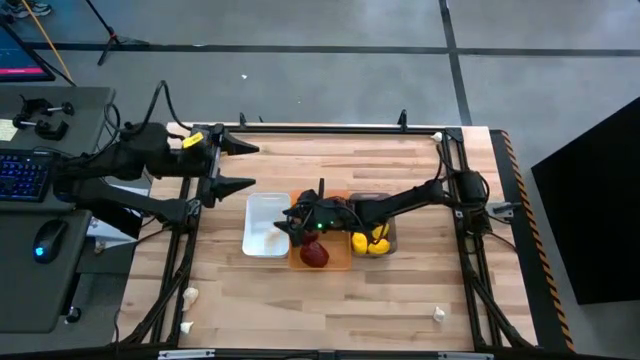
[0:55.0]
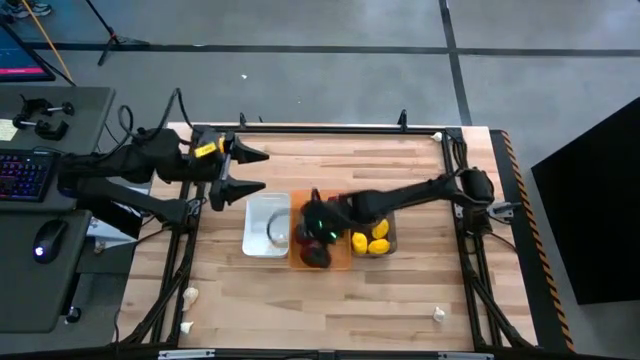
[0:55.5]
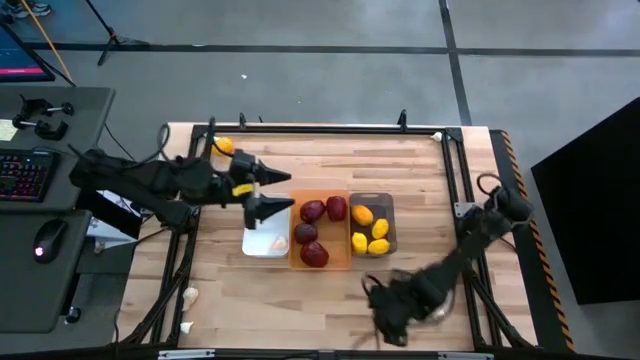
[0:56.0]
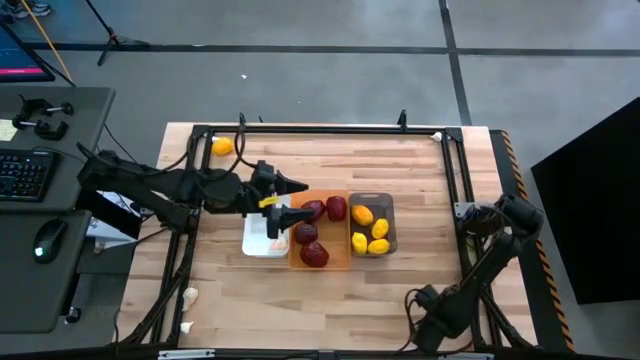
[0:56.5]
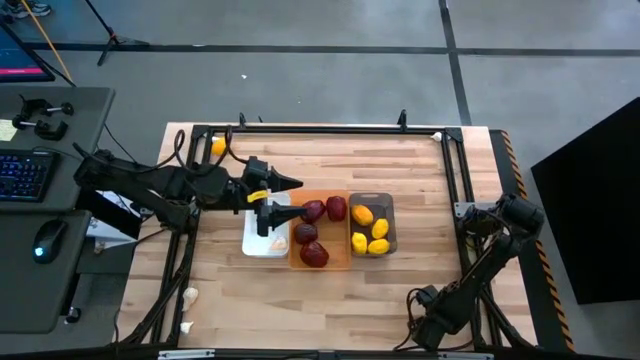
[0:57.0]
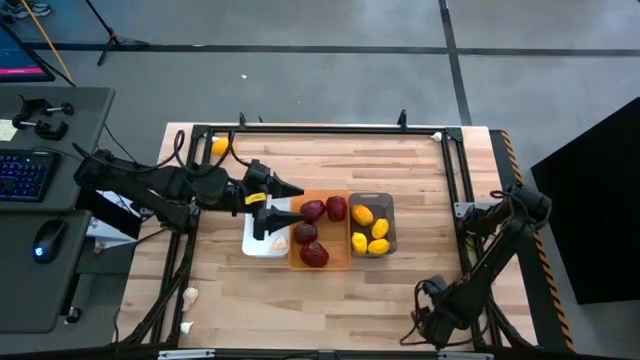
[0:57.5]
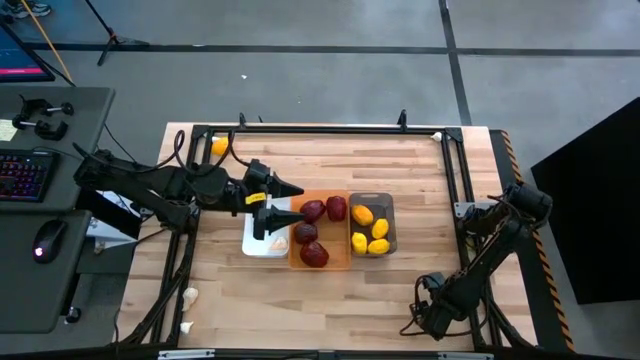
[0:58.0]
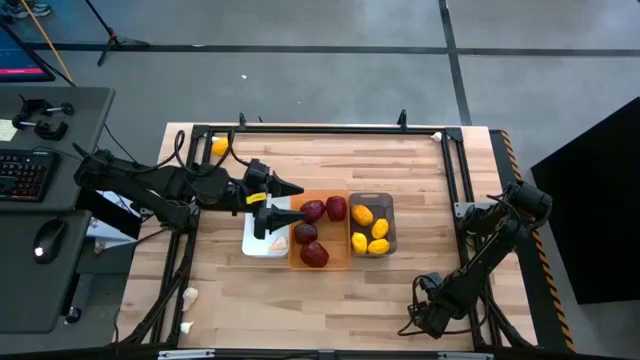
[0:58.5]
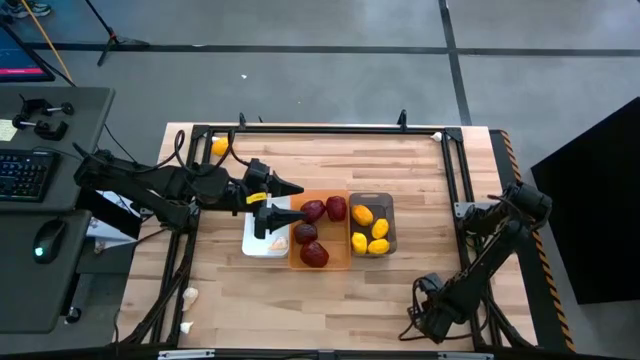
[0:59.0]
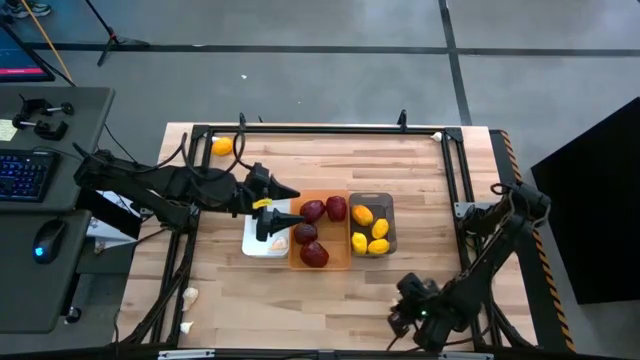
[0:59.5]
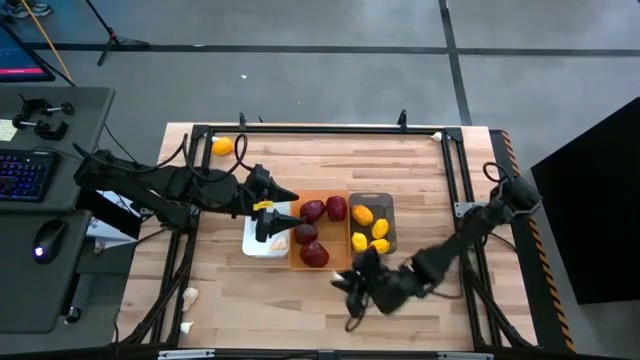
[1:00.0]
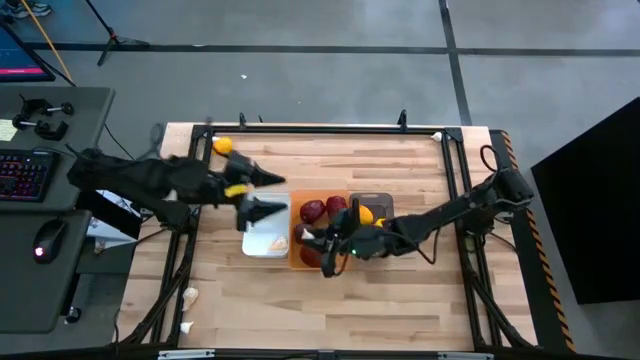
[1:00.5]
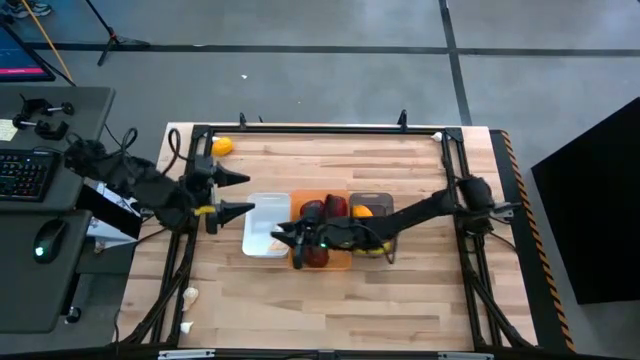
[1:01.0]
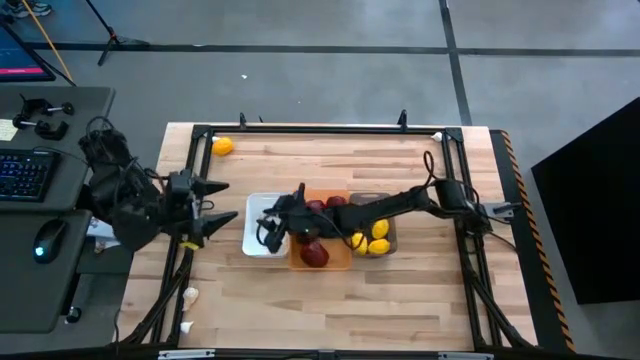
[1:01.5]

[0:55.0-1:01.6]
Task: Sort produce into baskets
Put the white garlic into the white bin

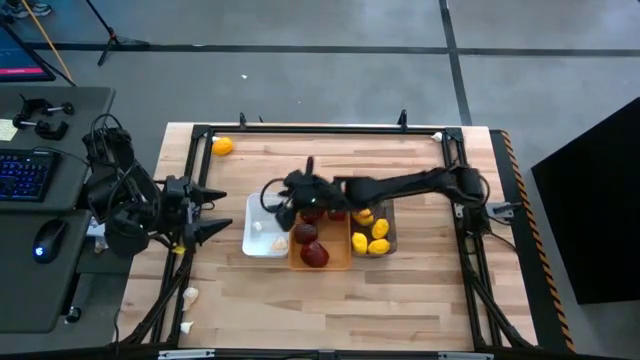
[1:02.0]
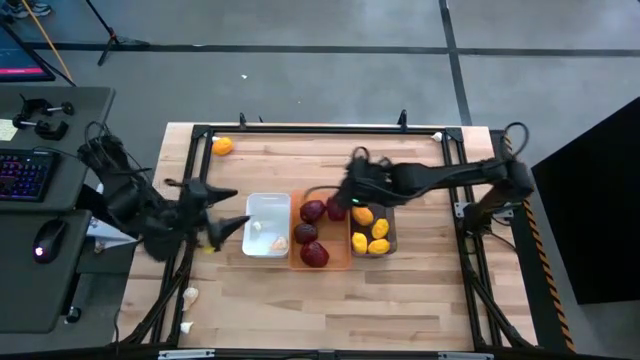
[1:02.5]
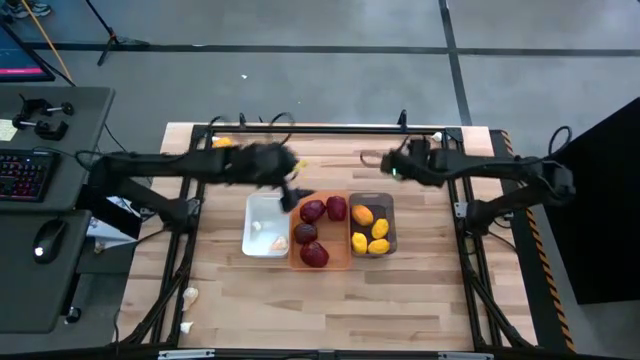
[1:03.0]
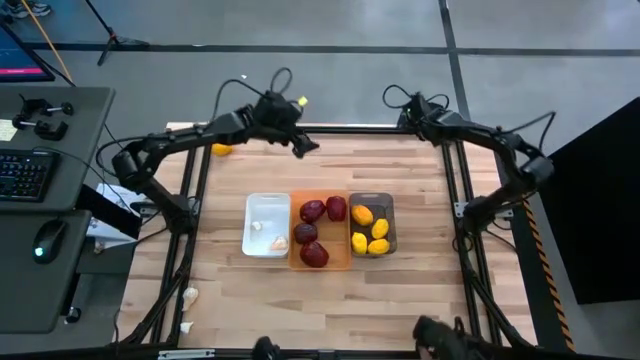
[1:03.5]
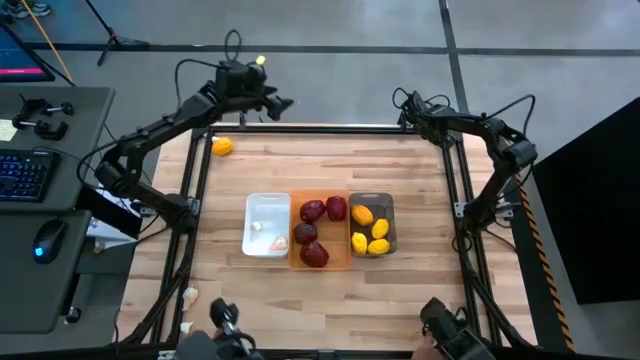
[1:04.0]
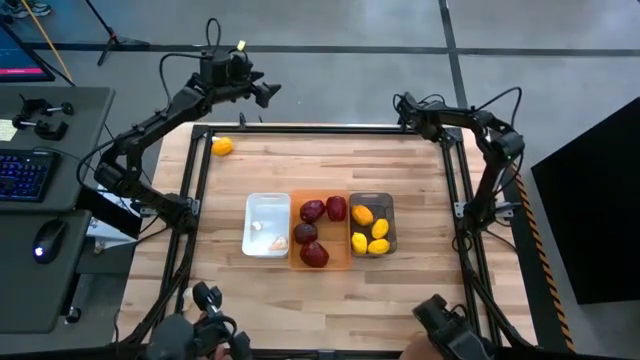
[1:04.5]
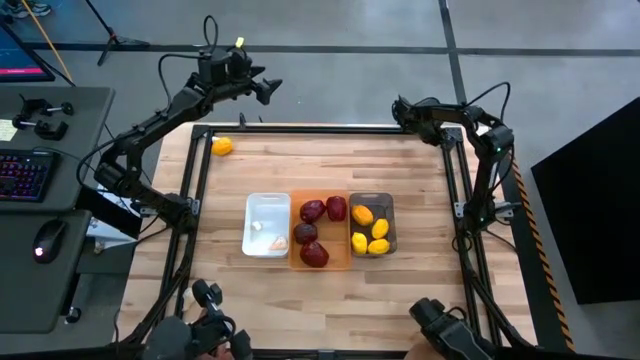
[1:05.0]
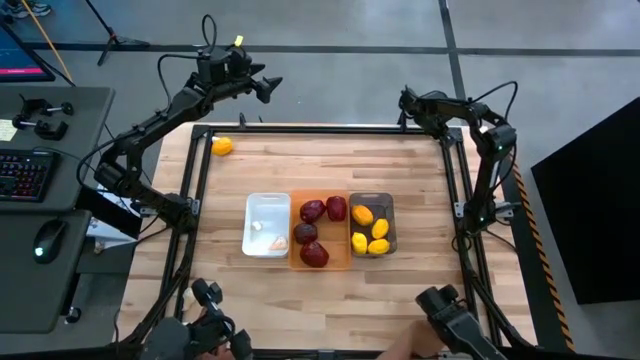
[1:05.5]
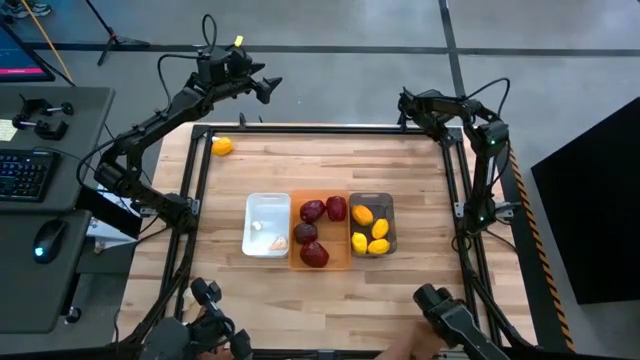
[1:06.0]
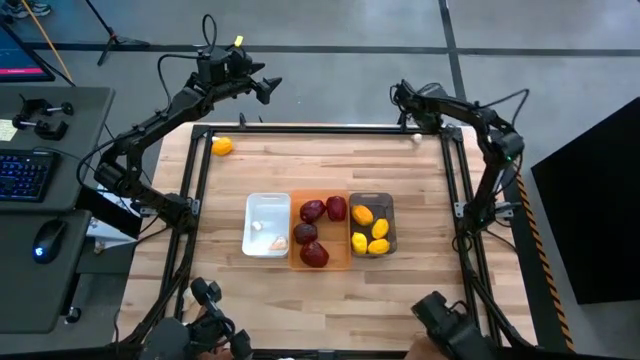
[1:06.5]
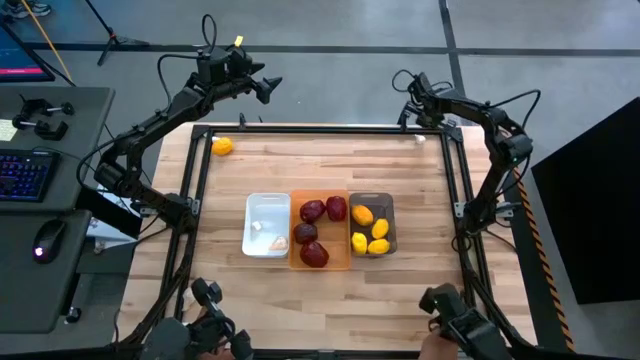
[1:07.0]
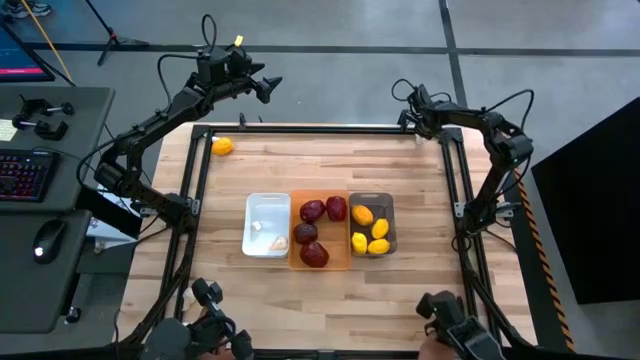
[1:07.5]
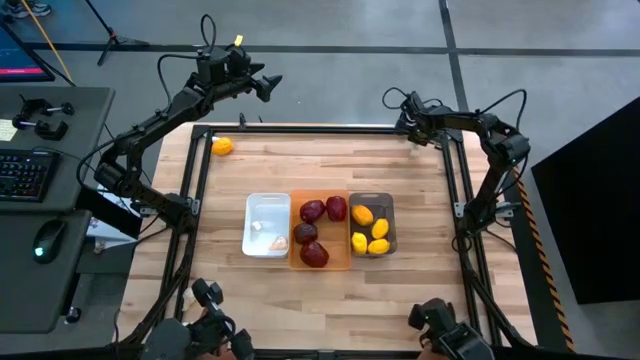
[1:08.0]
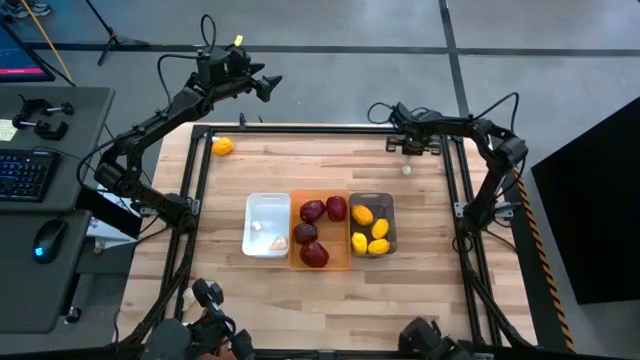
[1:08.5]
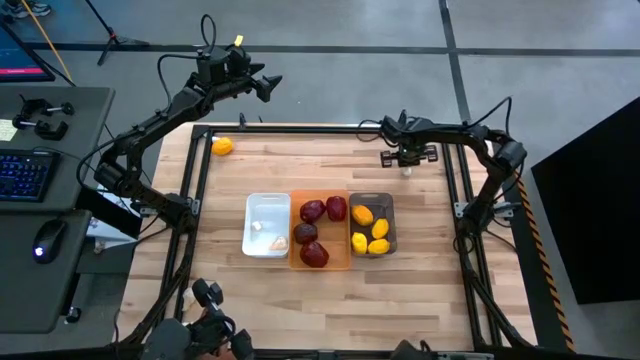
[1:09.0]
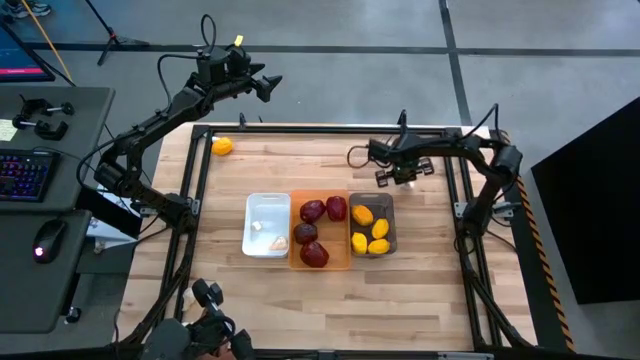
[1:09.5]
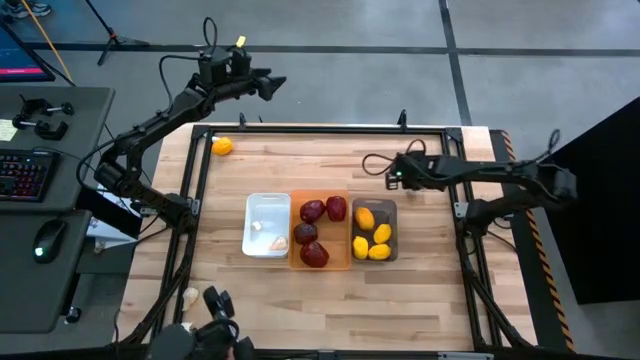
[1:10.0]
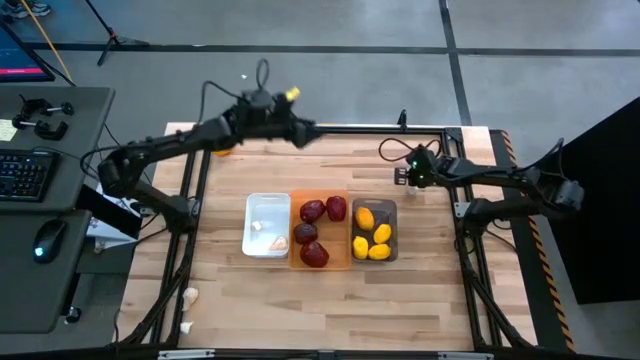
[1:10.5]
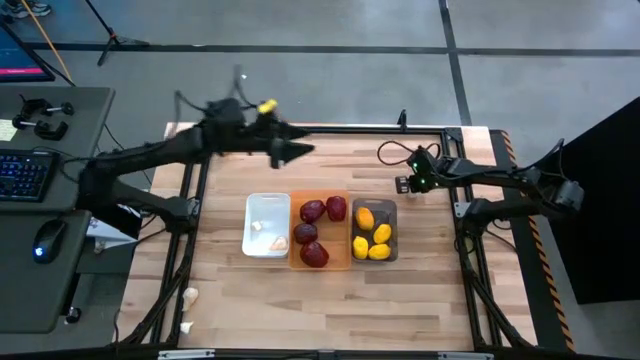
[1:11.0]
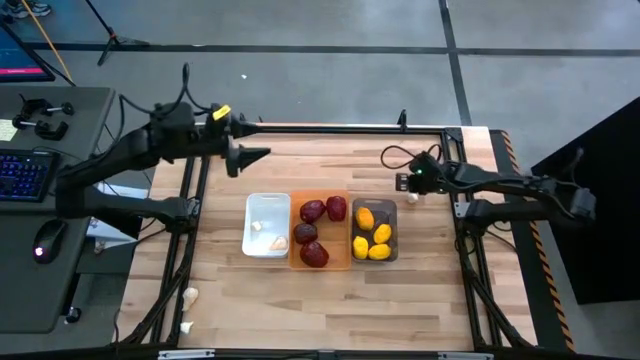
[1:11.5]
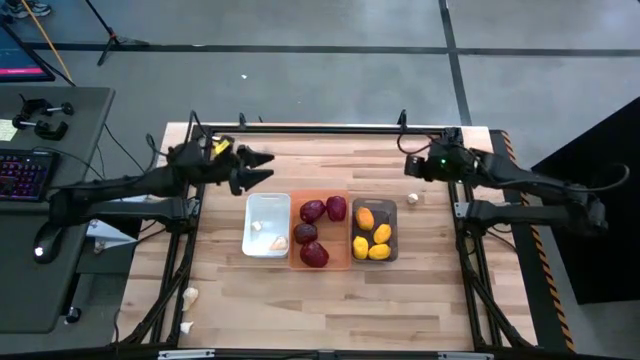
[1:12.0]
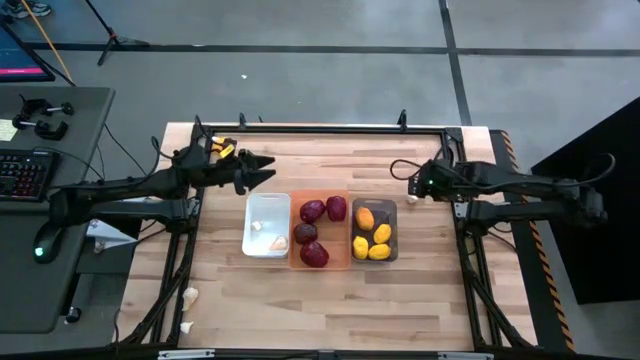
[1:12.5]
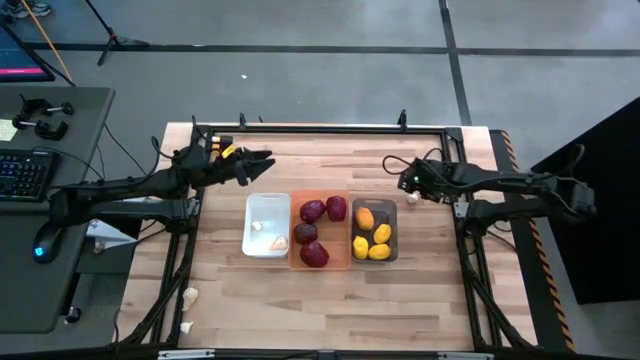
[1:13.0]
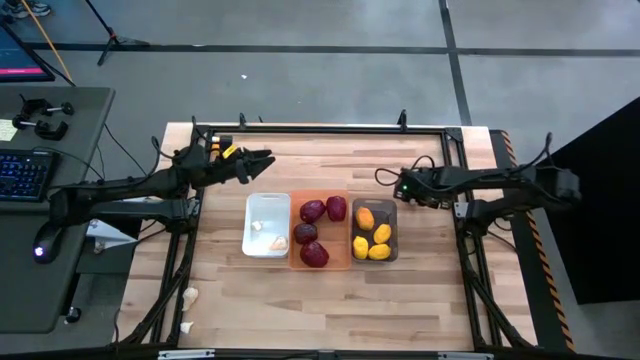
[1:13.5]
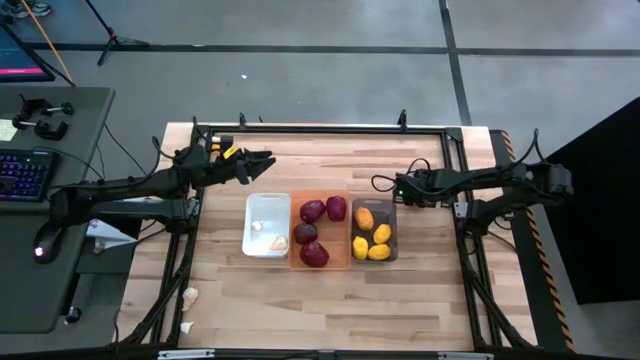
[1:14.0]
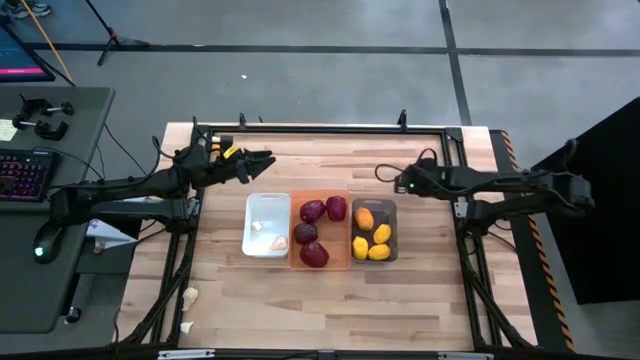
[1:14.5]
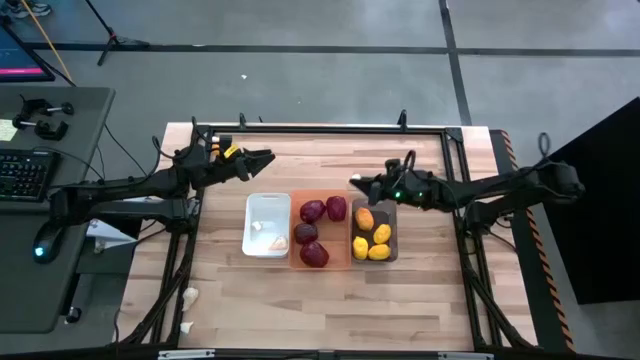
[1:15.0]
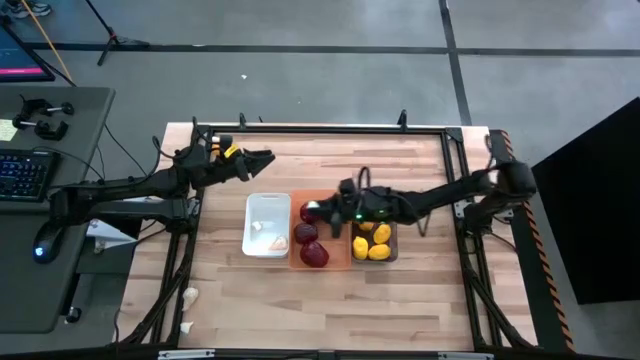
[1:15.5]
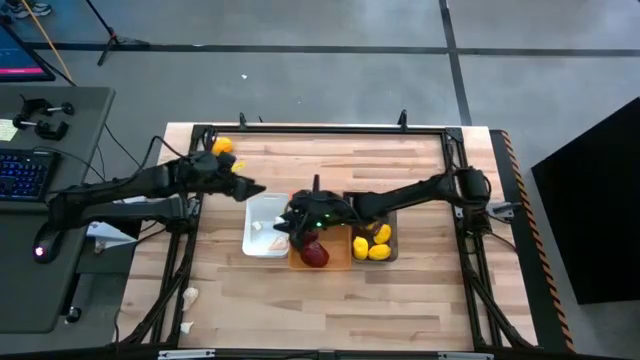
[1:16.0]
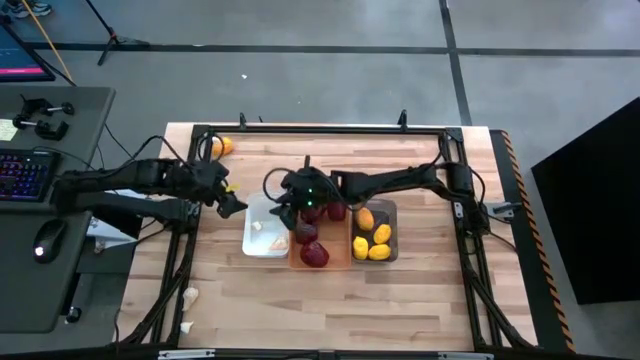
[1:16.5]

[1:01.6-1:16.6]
Put the white garlic into the white bin
